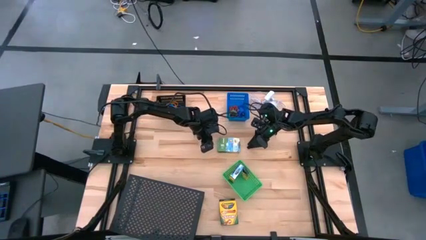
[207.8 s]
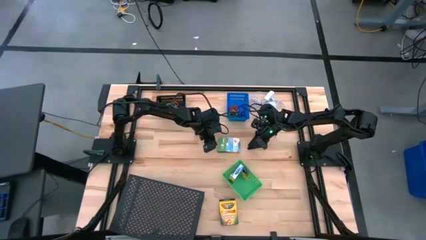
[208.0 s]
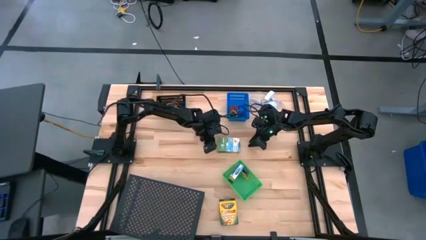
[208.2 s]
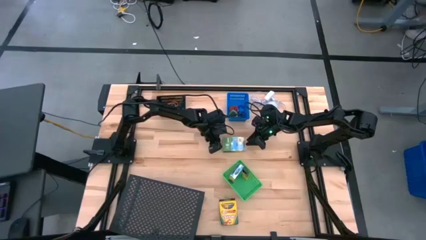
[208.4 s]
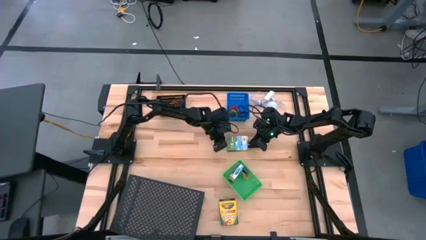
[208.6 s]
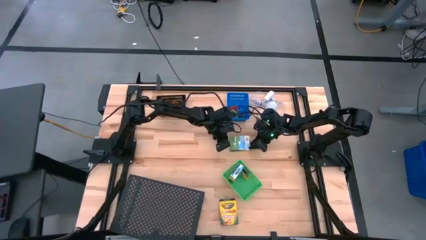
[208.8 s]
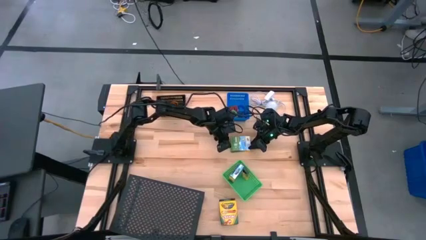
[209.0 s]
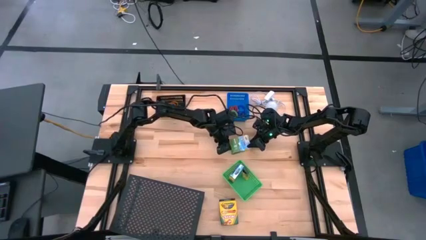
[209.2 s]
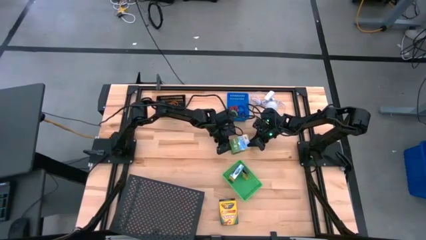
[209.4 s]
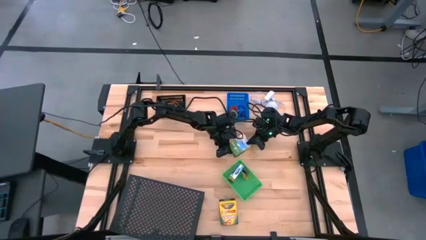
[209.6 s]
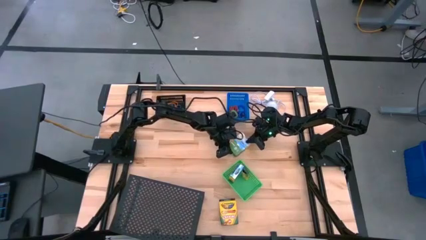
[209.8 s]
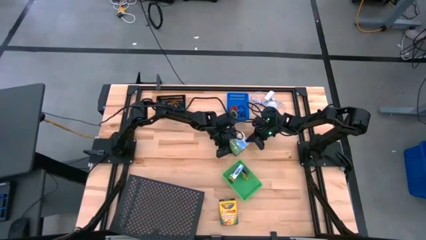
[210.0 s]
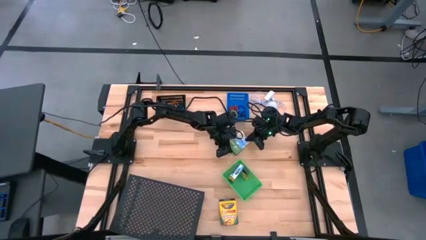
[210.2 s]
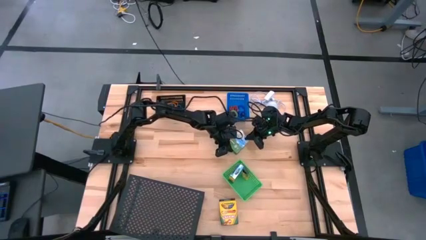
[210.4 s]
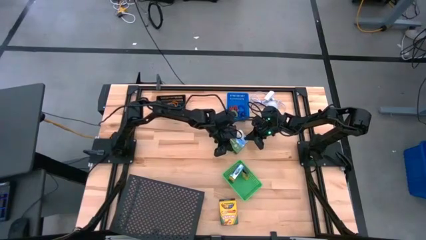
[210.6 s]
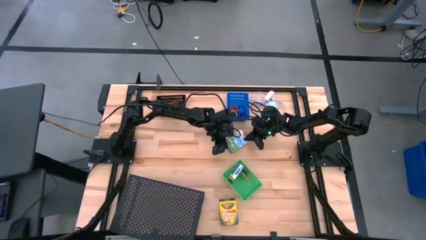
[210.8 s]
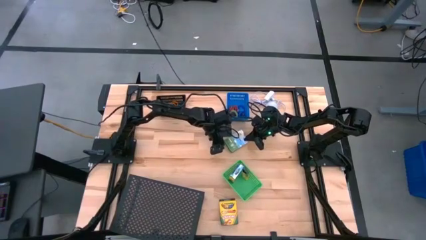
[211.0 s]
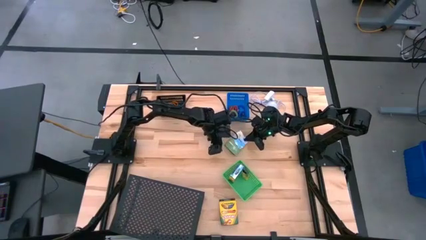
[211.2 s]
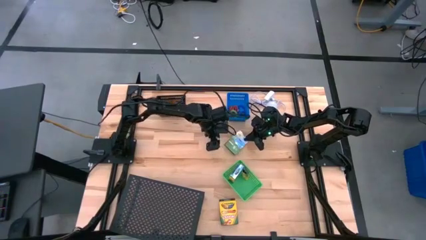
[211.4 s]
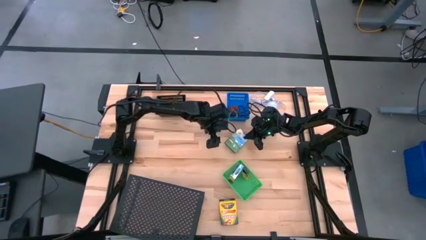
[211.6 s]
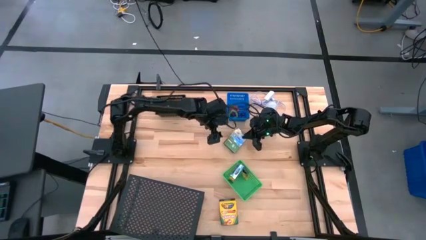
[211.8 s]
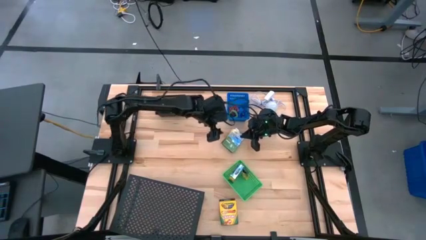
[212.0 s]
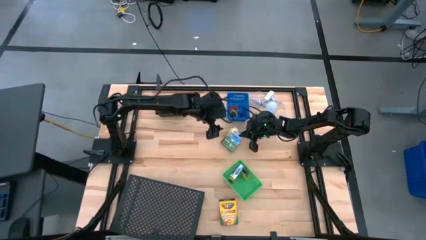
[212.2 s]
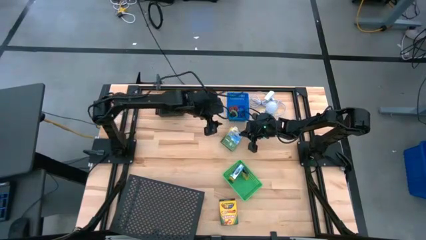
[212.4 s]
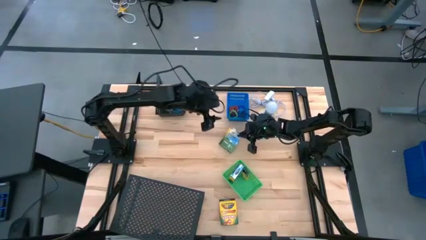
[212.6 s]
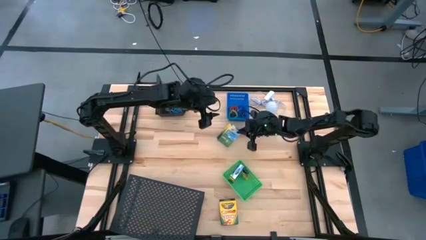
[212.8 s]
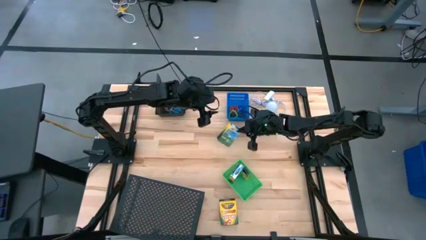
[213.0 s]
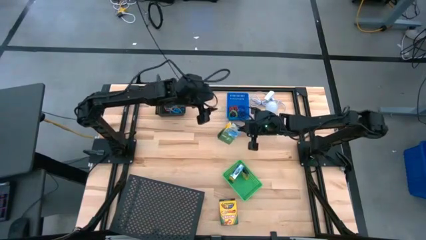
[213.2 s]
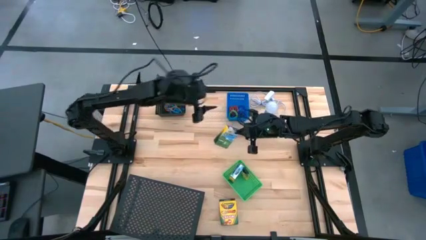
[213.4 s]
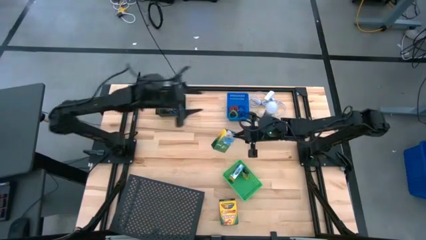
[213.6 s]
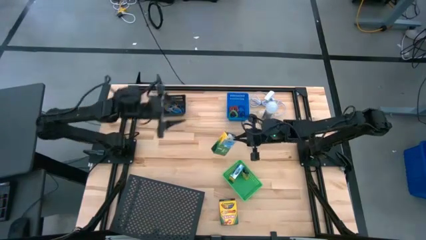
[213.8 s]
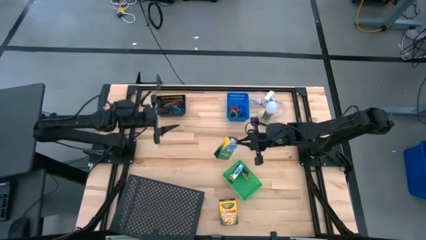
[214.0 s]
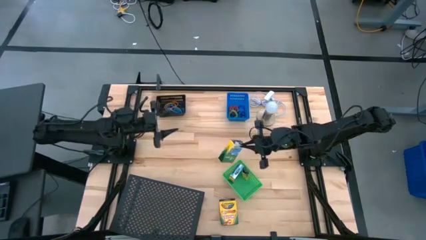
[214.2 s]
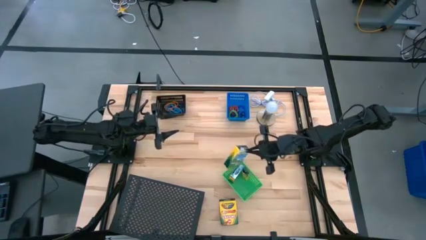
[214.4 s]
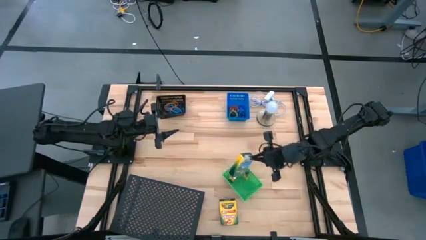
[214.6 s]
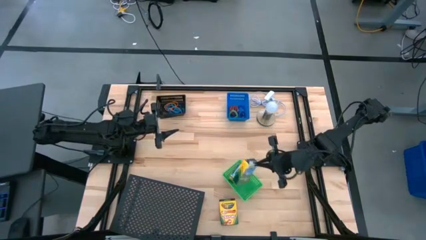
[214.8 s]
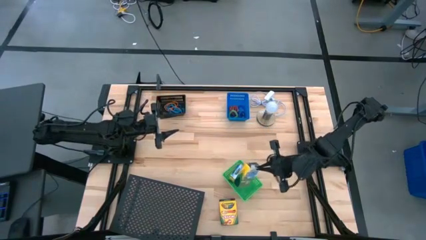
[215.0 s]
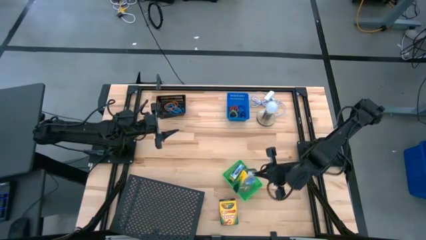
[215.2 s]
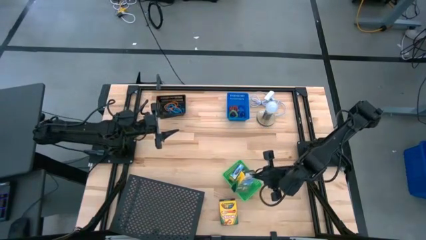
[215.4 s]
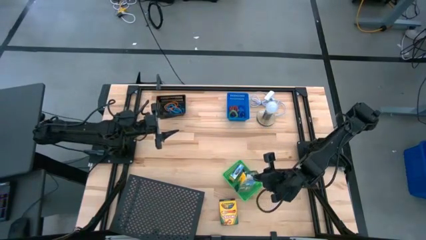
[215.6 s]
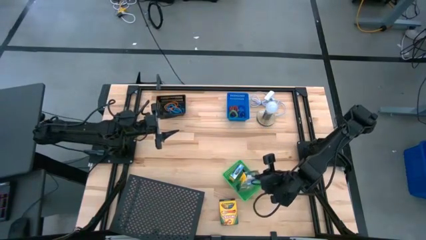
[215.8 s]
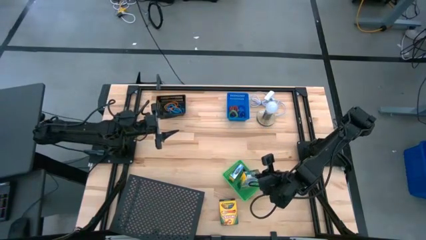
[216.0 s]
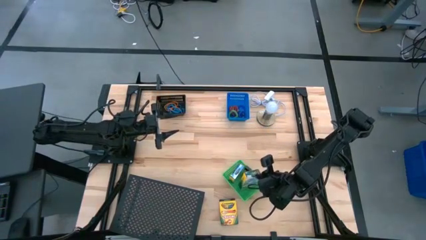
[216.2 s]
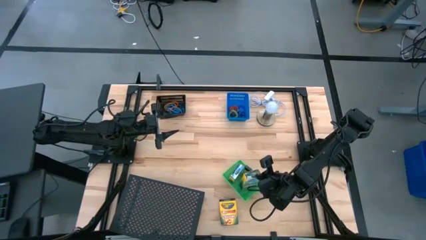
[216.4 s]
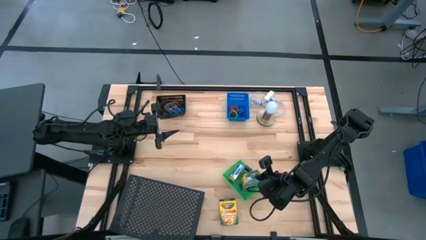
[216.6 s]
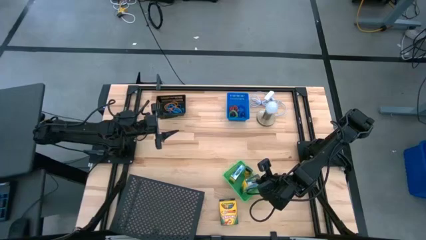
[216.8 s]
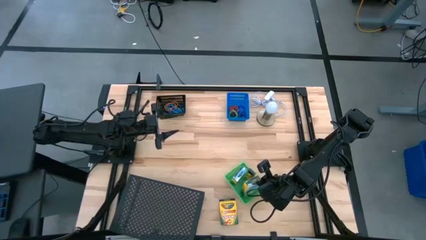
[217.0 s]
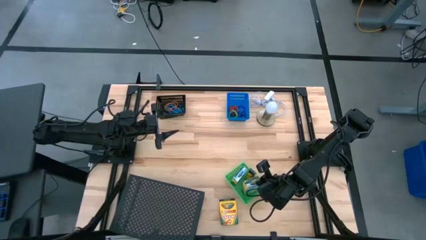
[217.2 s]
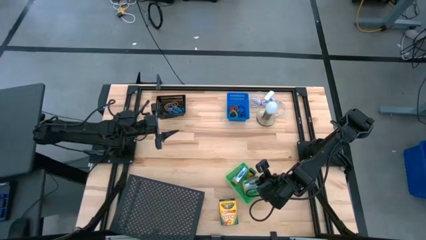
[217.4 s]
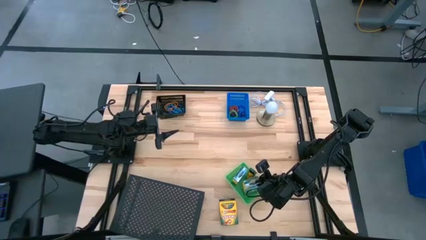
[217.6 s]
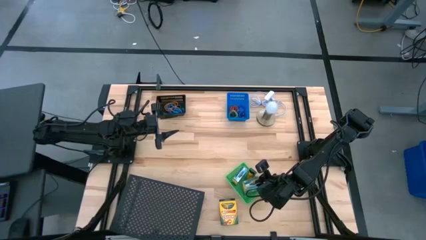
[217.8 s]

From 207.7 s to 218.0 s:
Task: Pick & Place Office Desk Supplies
Put the top large crayon box into the green bin

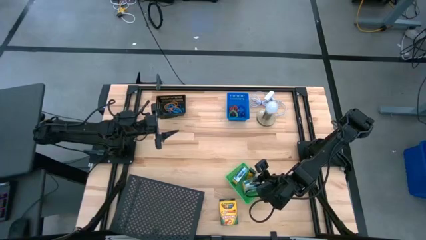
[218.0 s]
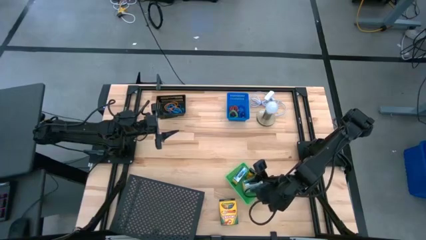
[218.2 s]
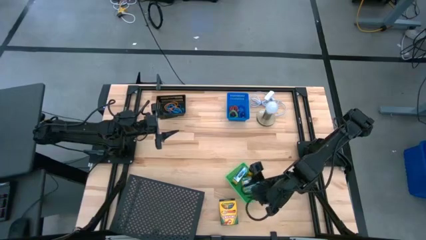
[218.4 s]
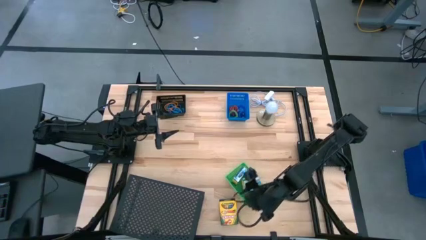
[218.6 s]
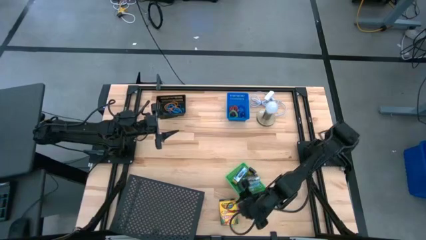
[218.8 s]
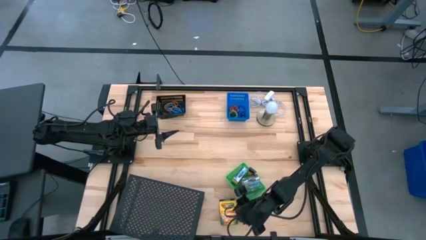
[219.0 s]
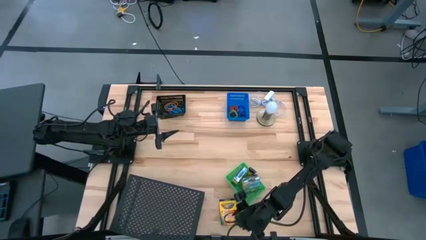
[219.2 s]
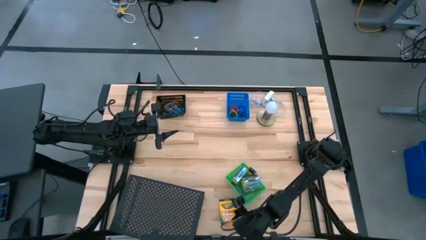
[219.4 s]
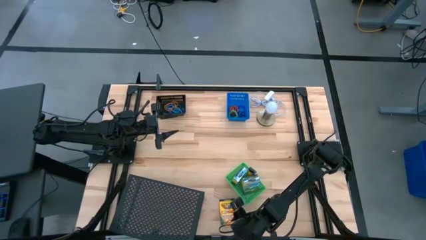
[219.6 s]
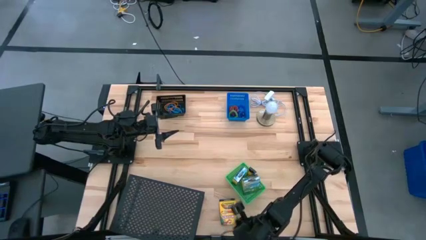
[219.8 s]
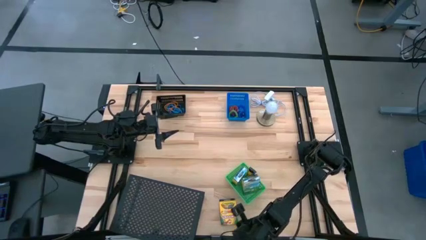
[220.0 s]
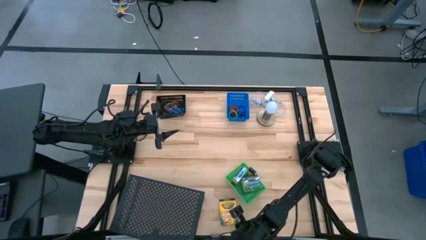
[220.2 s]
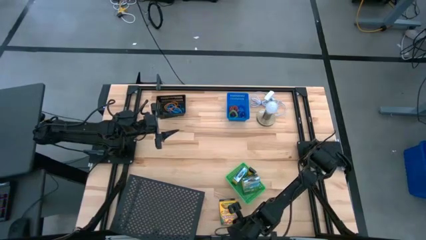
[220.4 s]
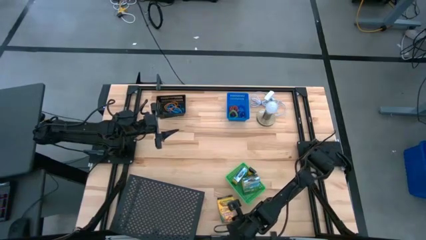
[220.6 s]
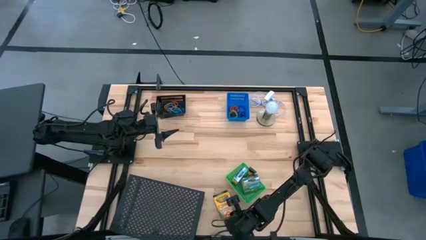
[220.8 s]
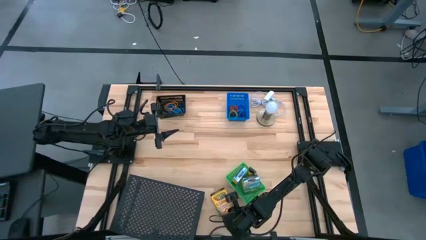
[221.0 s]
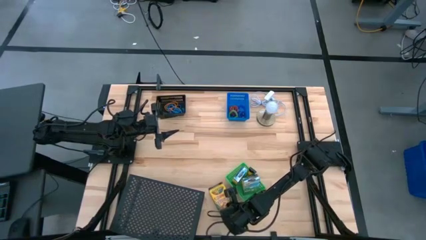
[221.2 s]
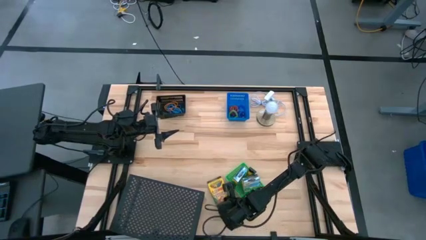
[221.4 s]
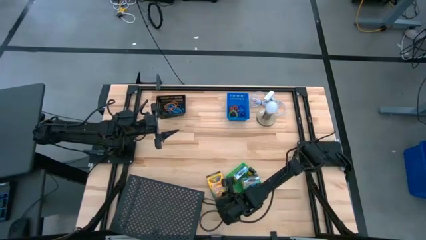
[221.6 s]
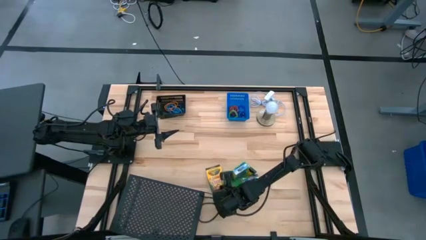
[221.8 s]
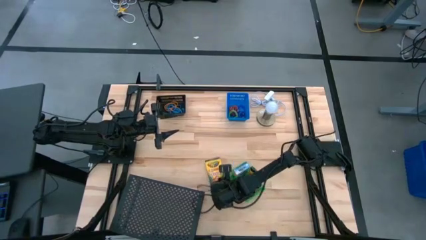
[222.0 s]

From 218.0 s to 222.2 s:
Move the large crayon box to the center of the table

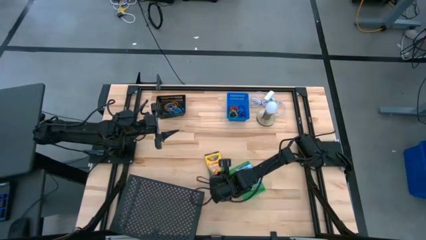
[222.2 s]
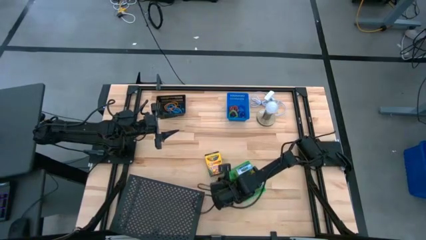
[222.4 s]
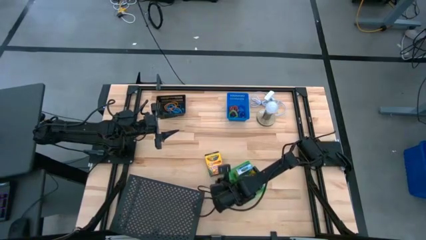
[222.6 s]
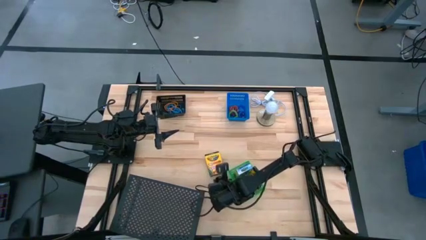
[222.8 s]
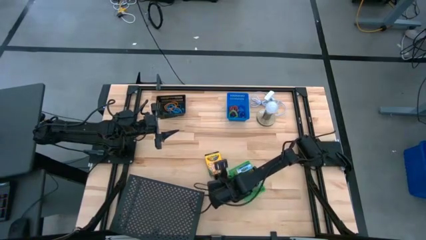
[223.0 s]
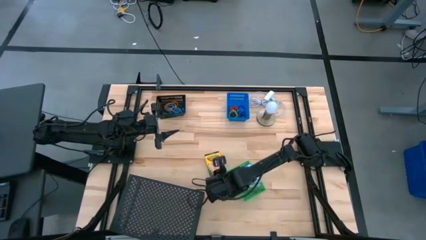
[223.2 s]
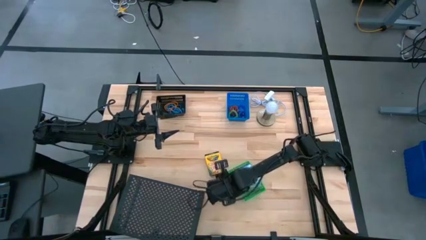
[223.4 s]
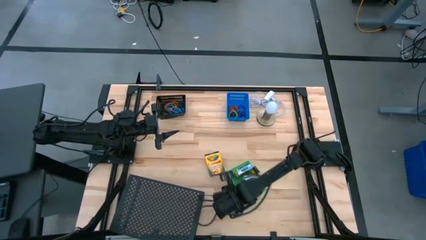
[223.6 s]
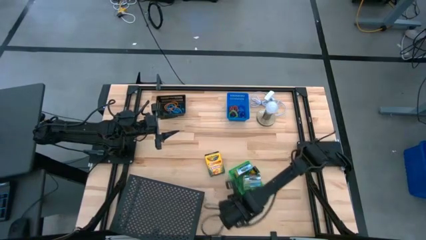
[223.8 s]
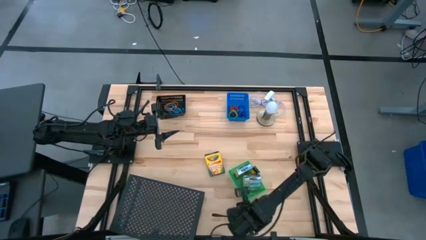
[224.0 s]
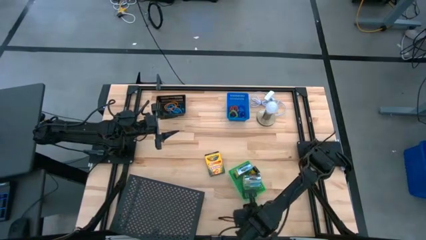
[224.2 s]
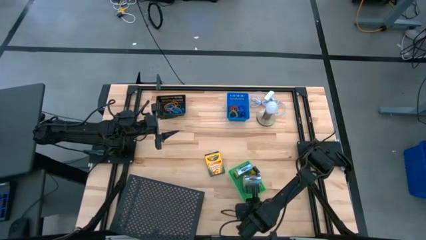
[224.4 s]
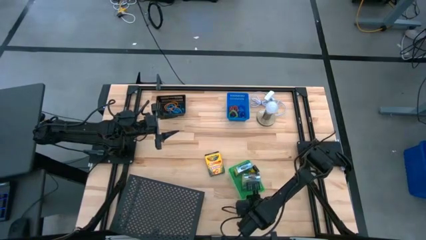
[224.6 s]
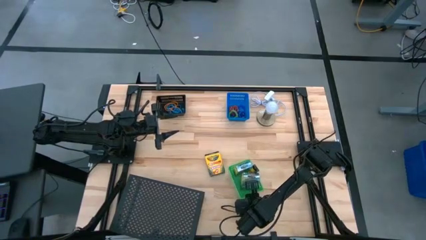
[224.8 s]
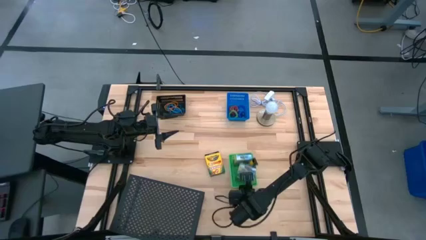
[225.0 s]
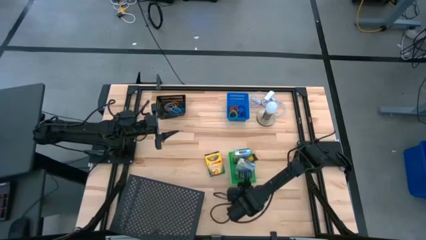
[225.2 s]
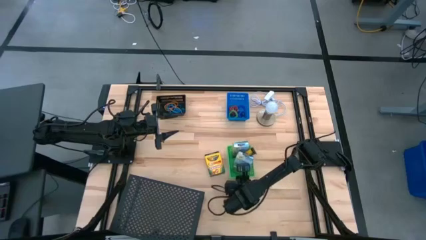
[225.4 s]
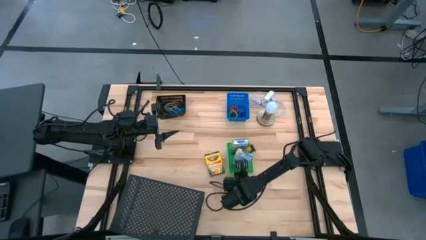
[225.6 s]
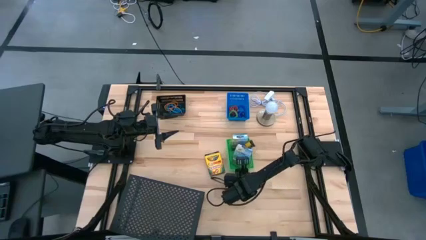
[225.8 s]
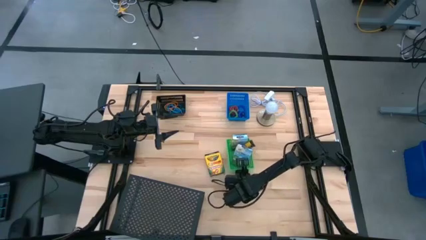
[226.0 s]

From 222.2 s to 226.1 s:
Adjust the green bin on the table
